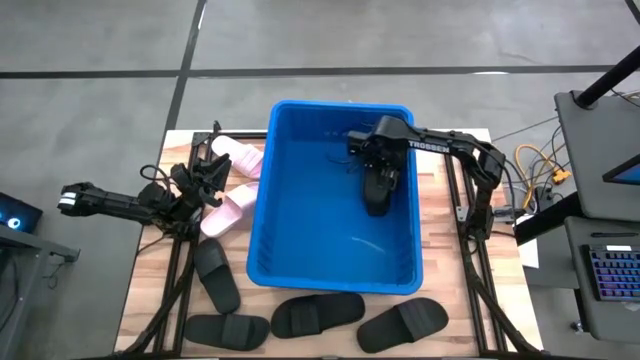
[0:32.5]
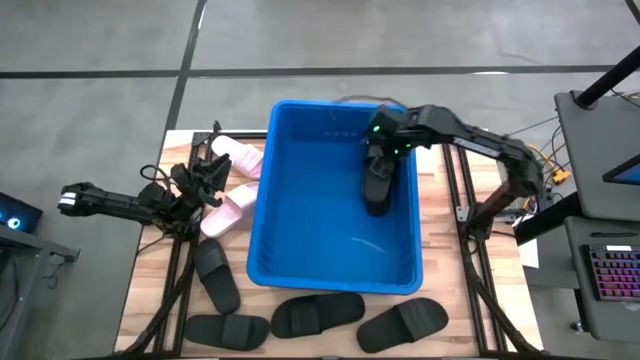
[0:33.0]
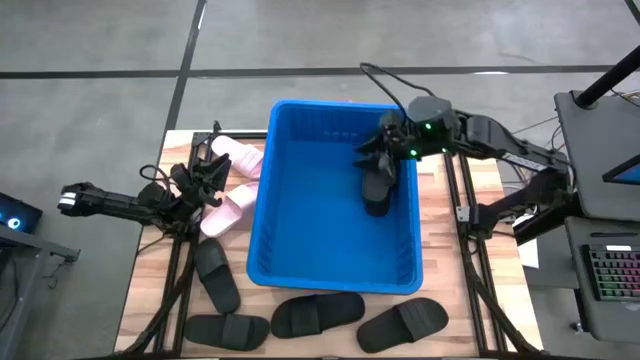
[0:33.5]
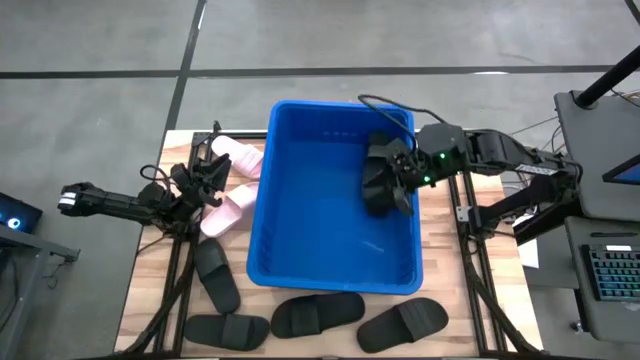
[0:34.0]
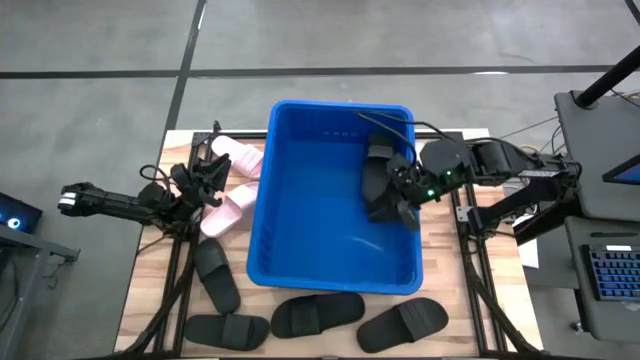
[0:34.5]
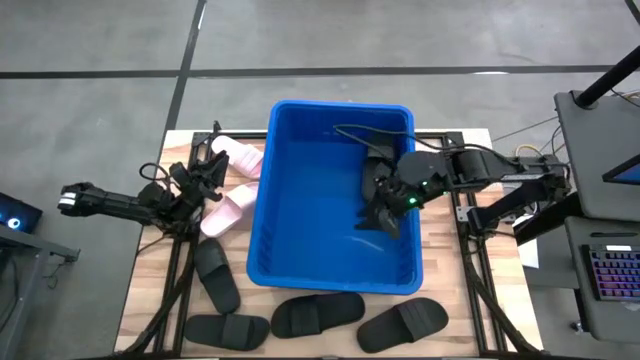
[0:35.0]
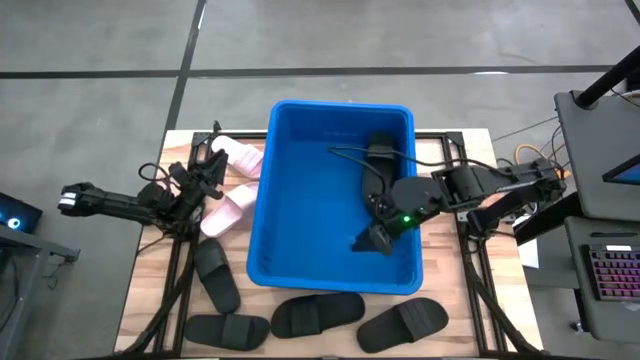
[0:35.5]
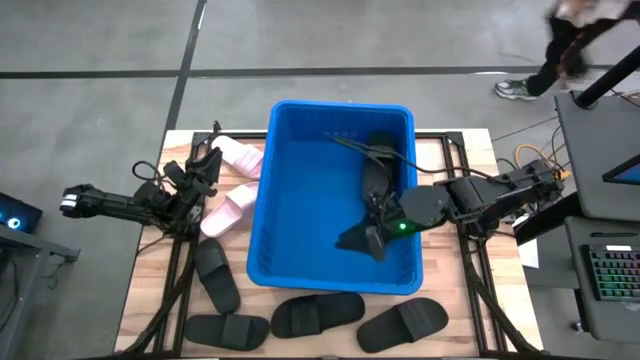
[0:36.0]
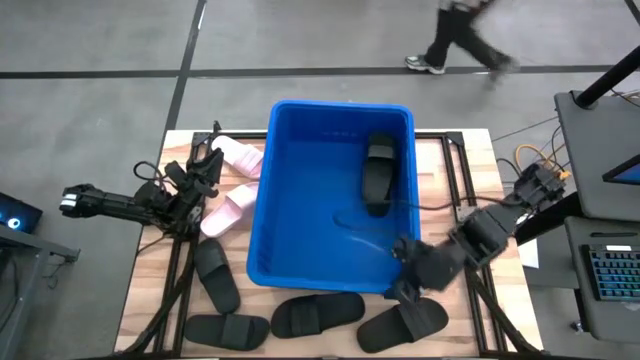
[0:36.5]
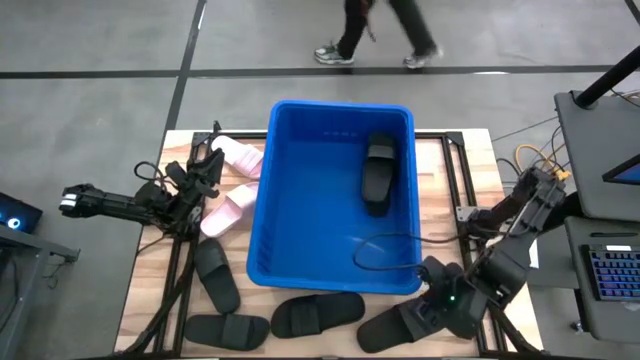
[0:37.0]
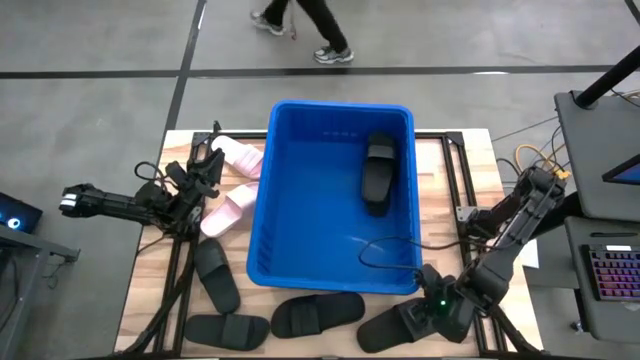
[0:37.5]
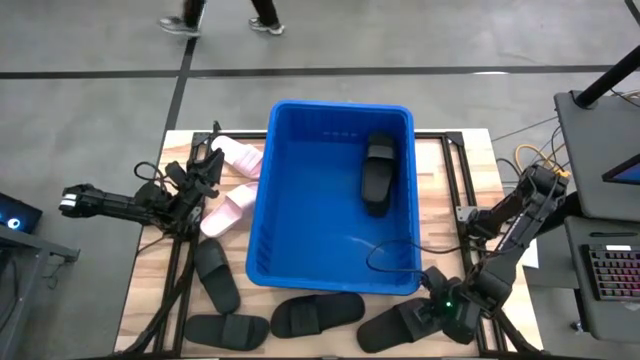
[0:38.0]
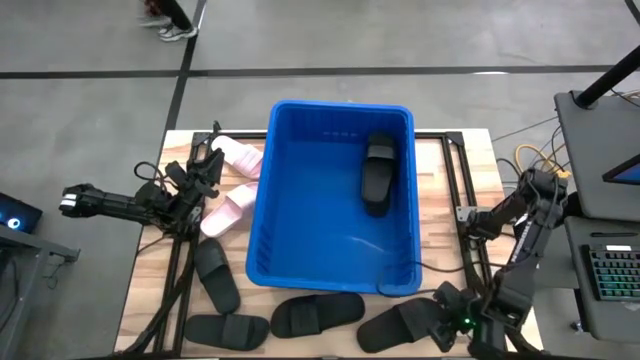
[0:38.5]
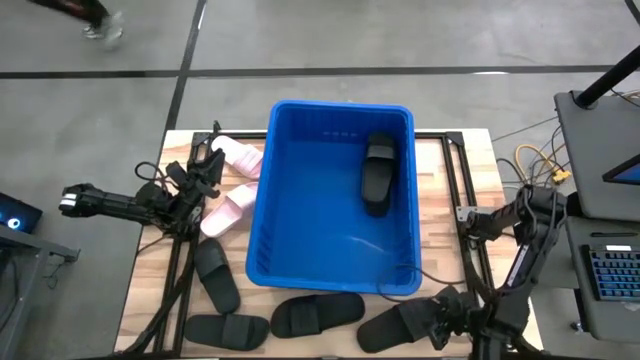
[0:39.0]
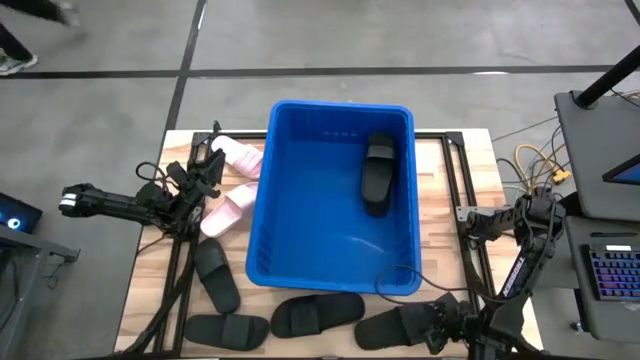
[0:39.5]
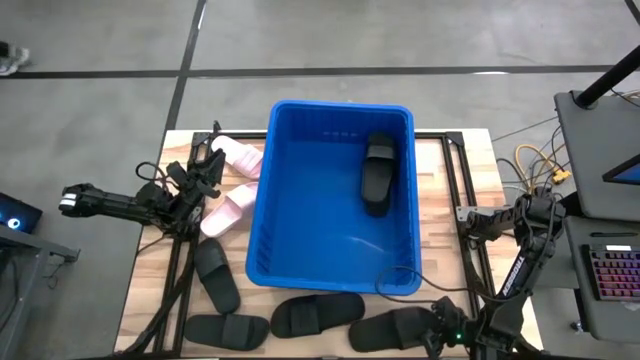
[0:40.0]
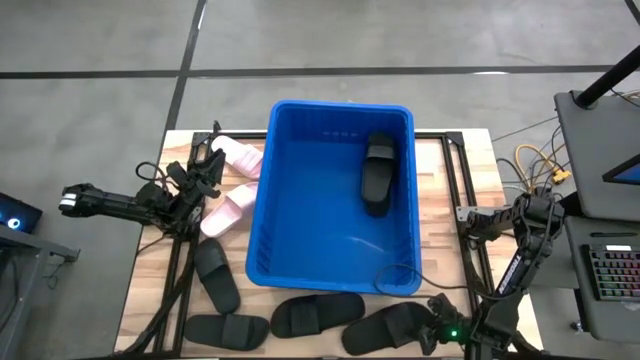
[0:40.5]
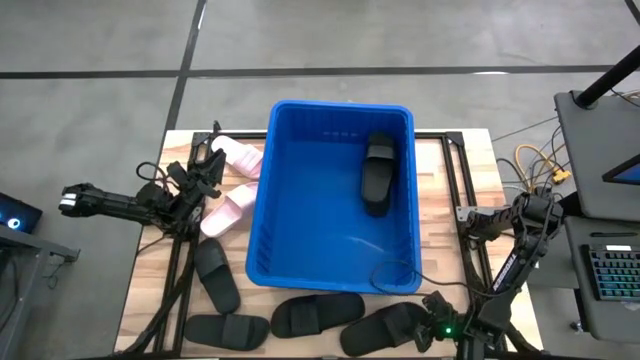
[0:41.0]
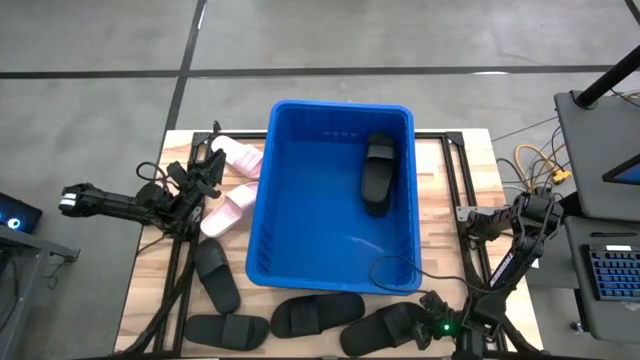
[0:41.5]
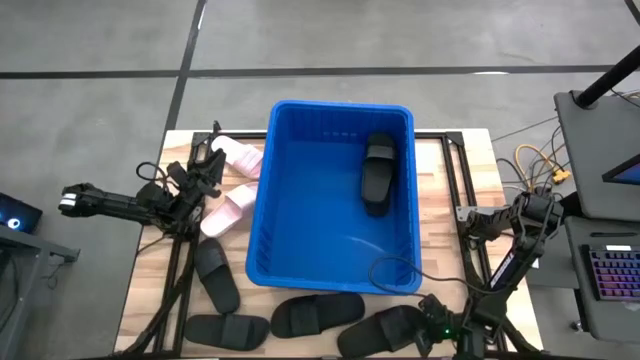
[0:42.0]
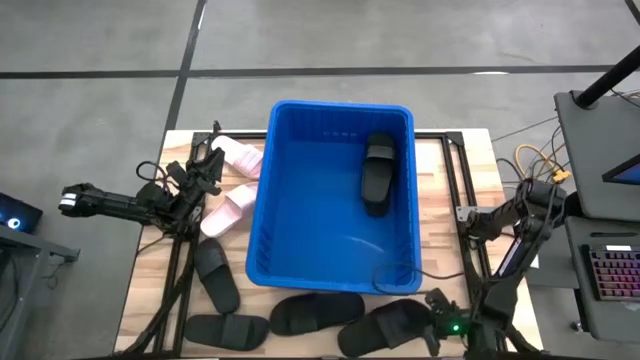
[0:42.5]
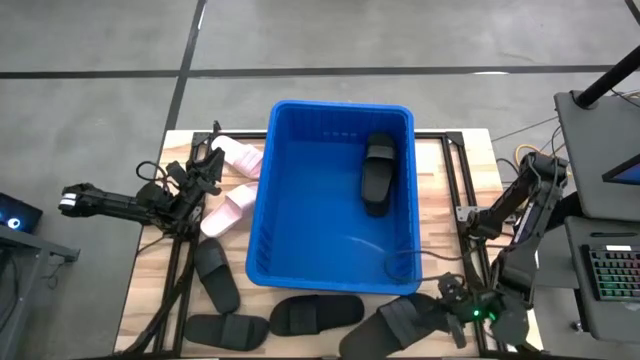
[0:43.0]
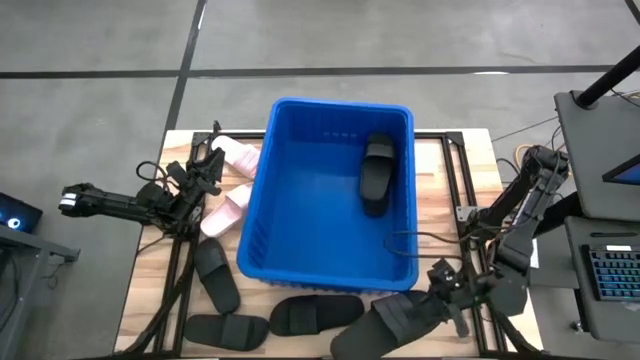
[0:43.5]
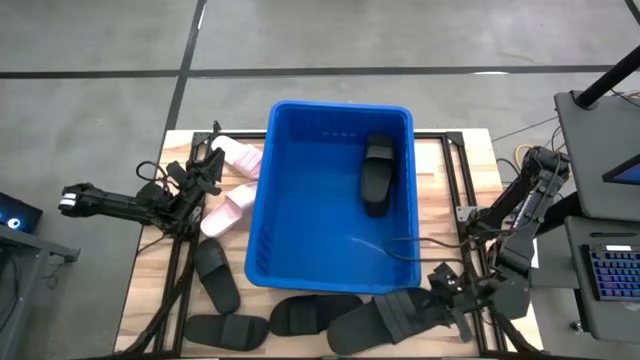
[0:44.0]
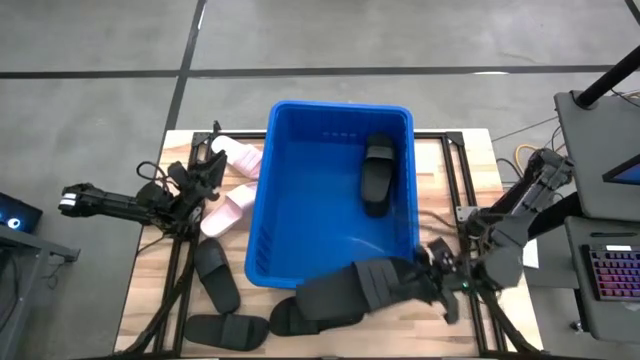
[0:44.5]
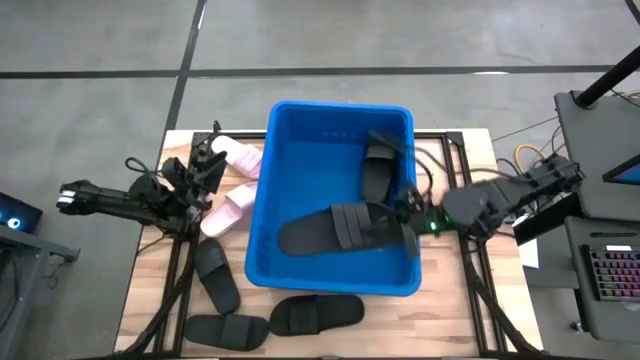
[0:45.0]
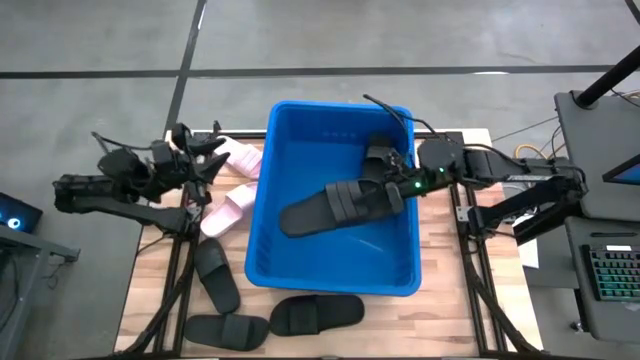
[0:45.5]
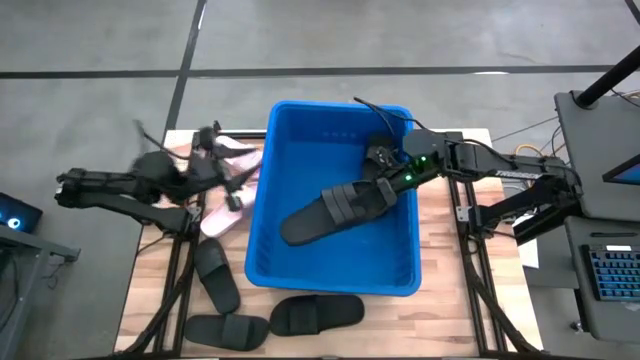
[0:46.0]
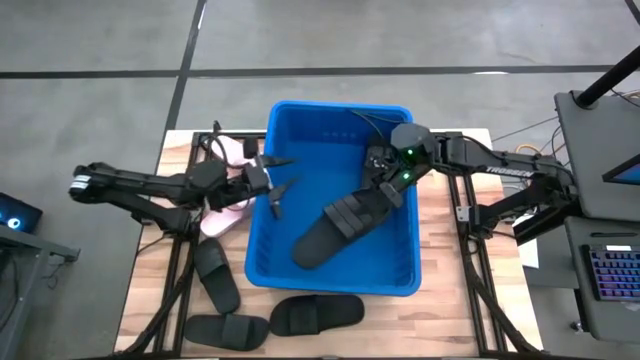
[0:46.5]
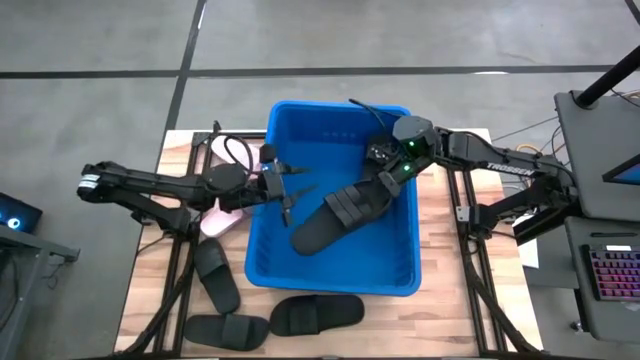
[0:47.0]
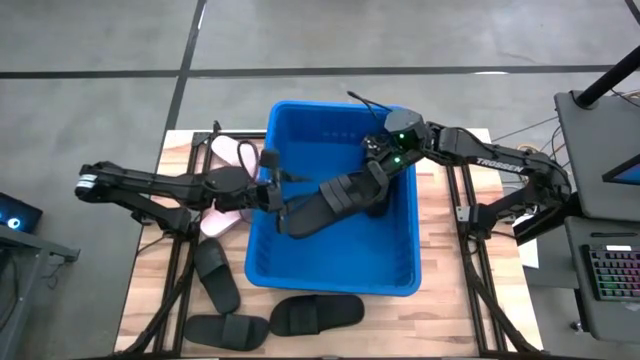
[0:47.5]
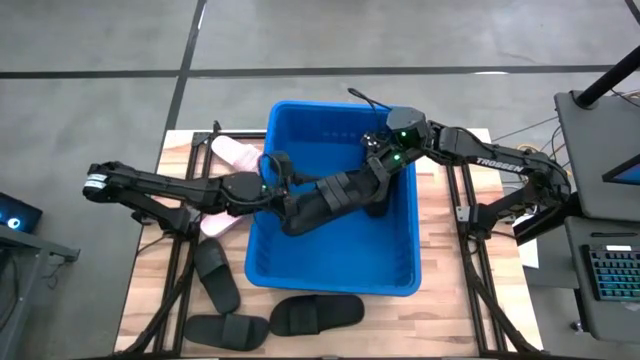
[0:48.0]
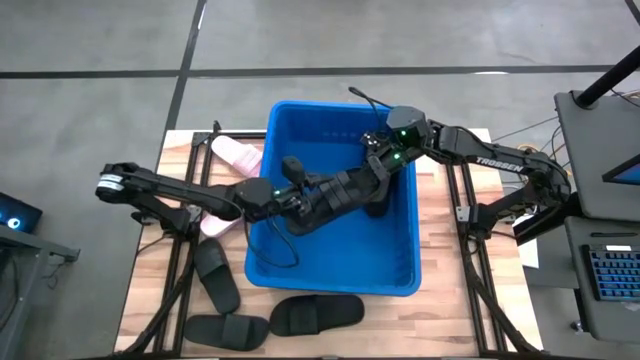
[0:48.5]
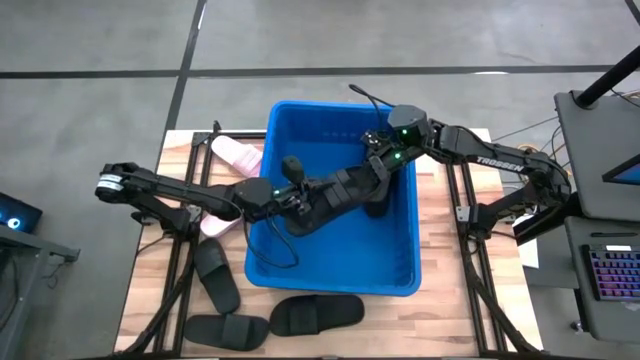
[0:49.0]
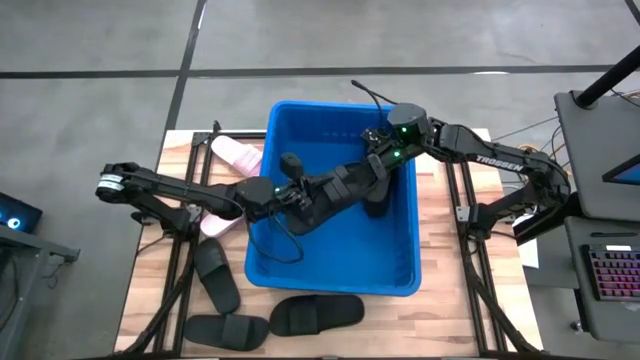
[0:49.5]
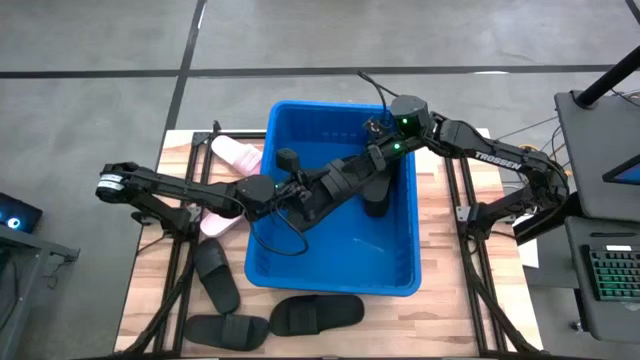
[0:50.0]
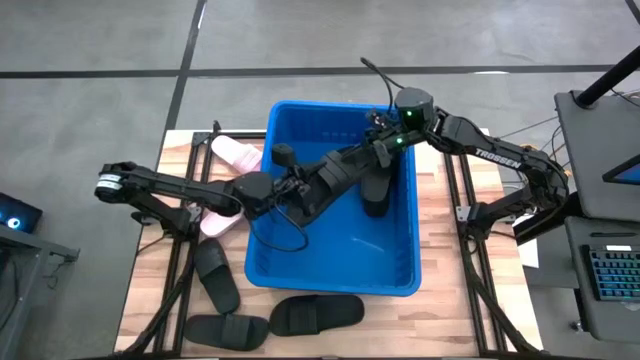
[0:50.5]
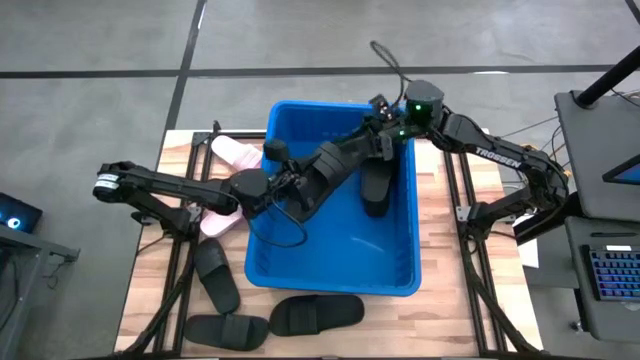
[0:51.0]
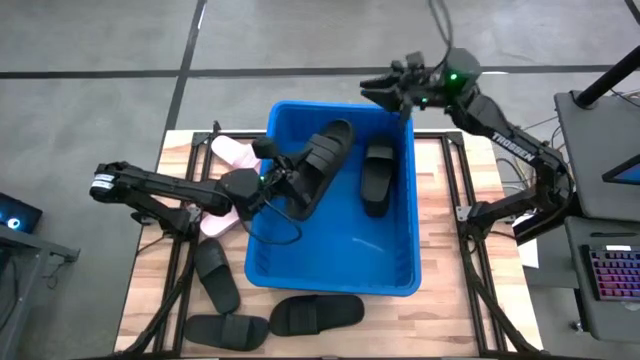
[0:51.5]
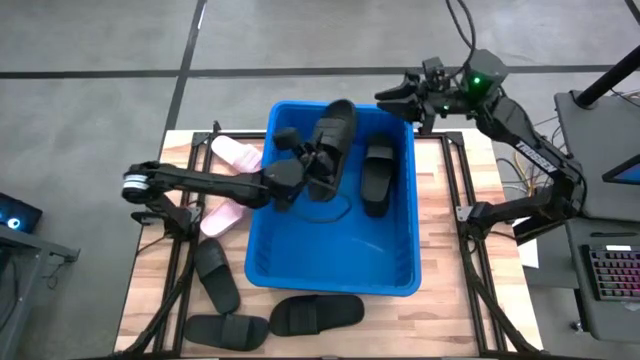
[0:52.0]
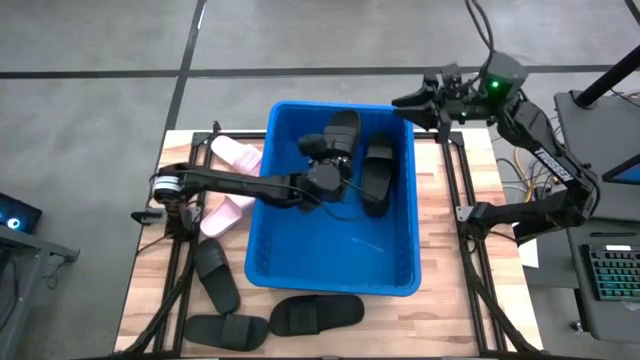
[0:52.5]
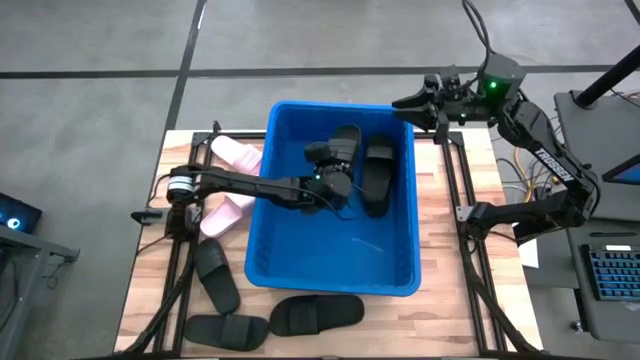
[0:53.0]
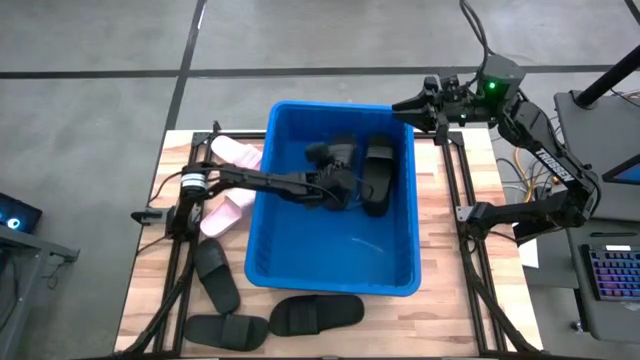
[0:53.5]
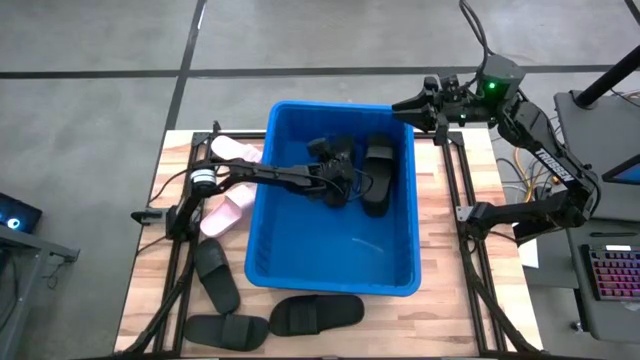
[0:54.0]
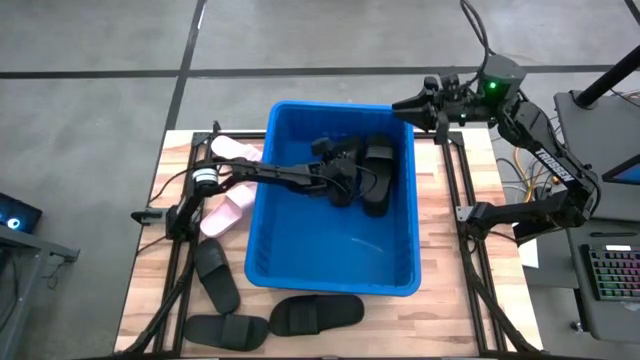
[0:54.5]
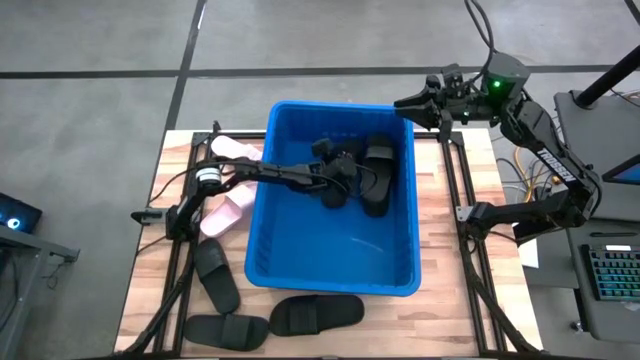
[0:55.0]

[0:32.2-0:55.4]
Task: Pick and place slides into bin
Put the black slide into the blue bin
